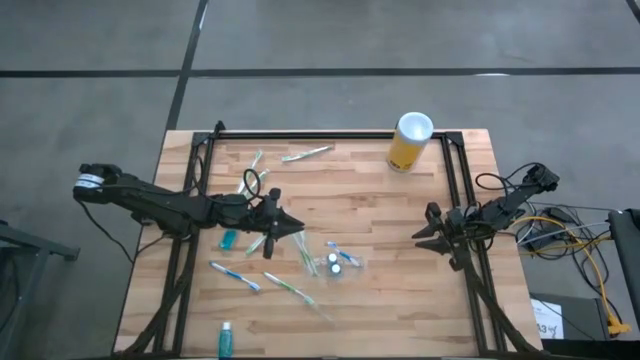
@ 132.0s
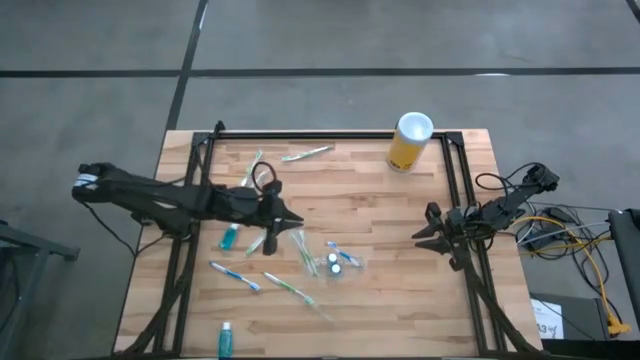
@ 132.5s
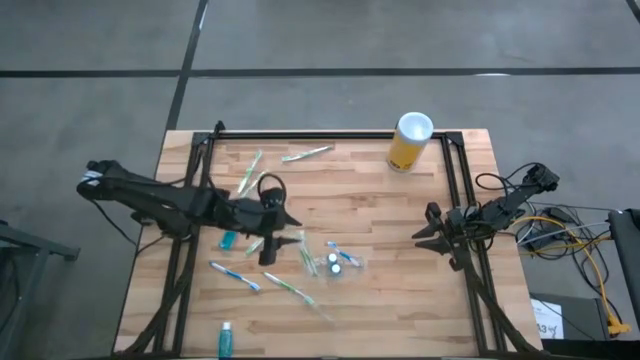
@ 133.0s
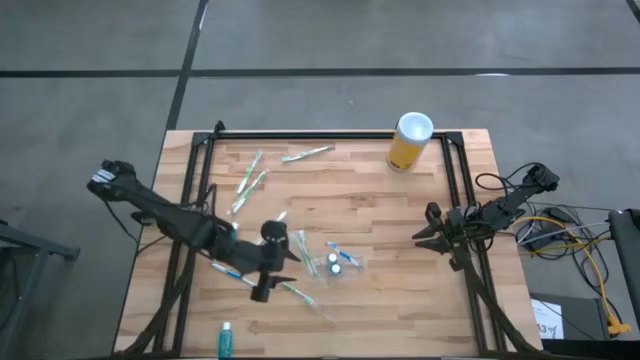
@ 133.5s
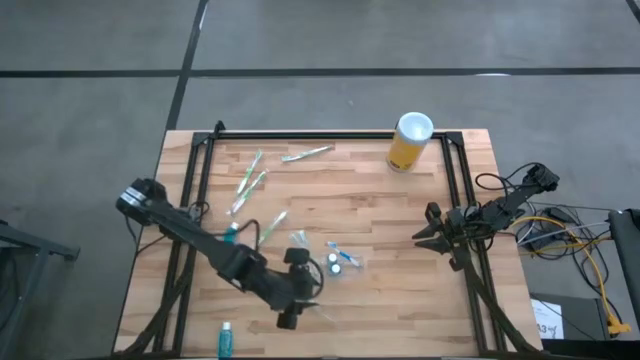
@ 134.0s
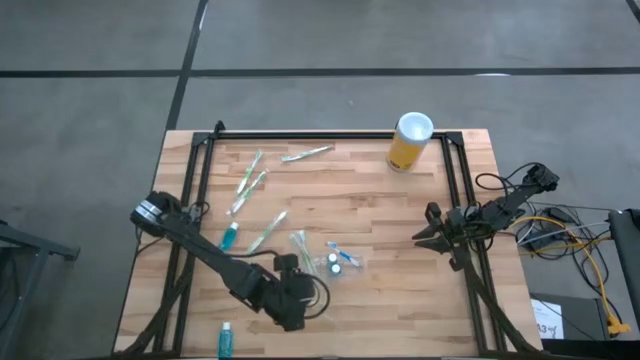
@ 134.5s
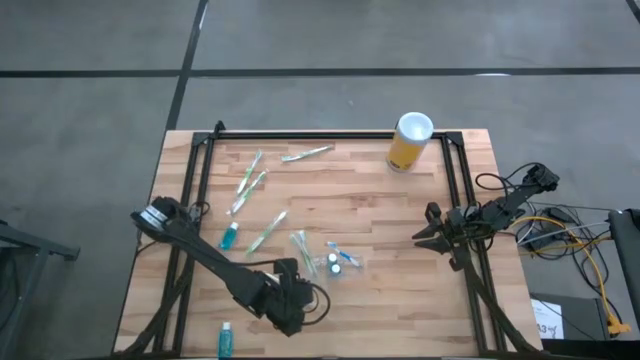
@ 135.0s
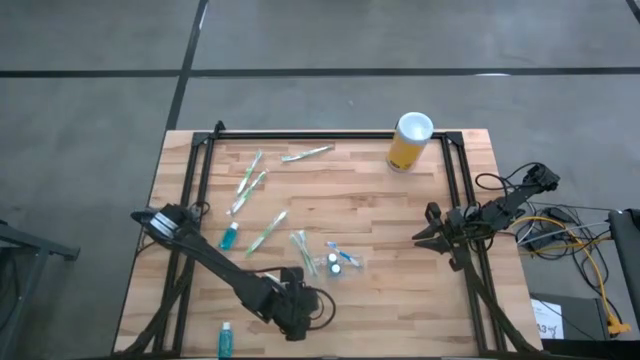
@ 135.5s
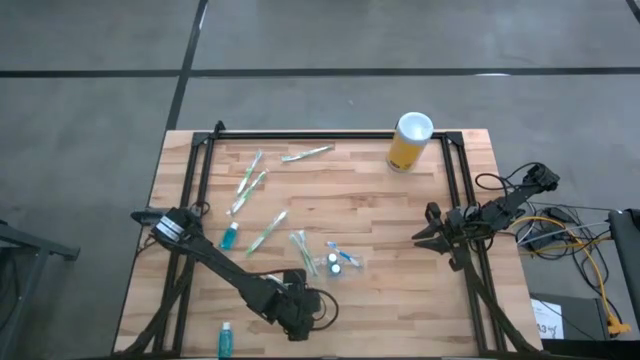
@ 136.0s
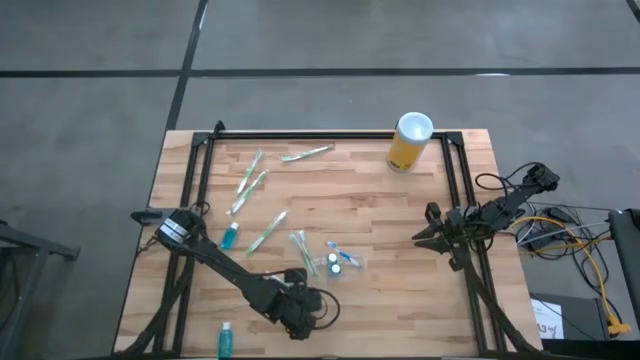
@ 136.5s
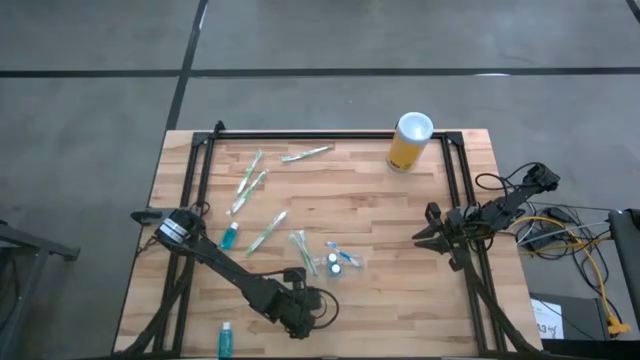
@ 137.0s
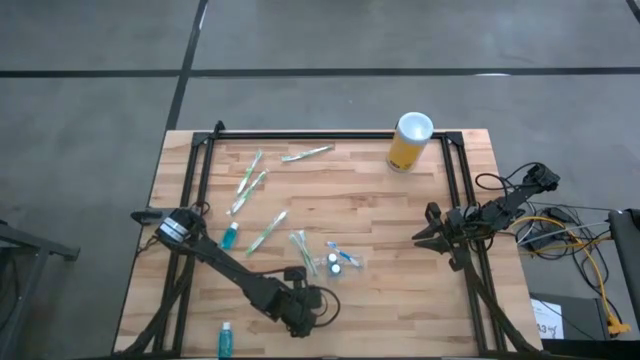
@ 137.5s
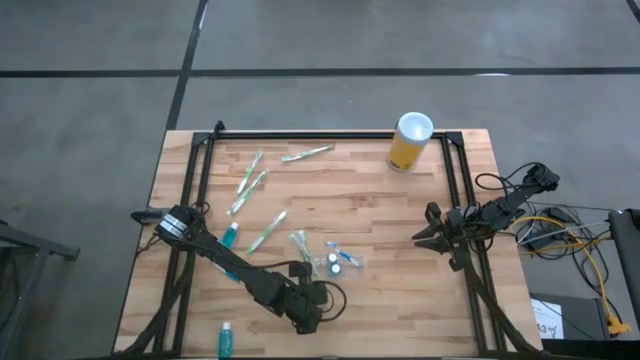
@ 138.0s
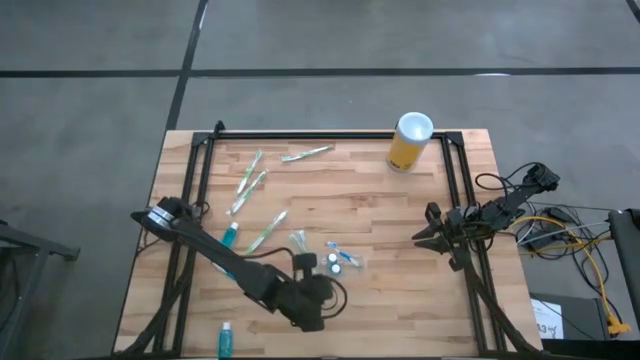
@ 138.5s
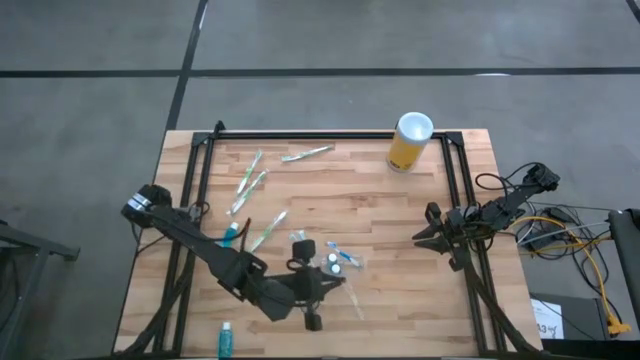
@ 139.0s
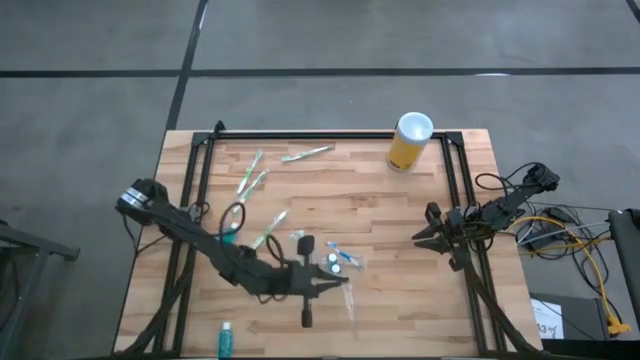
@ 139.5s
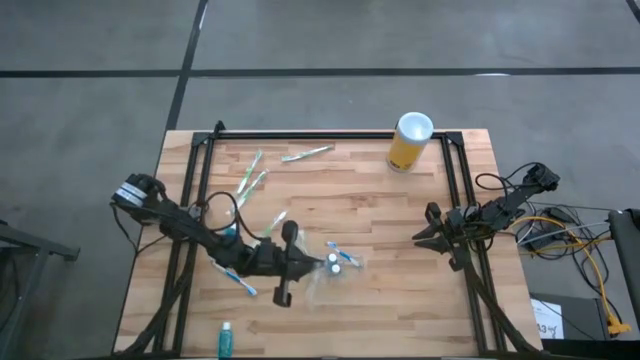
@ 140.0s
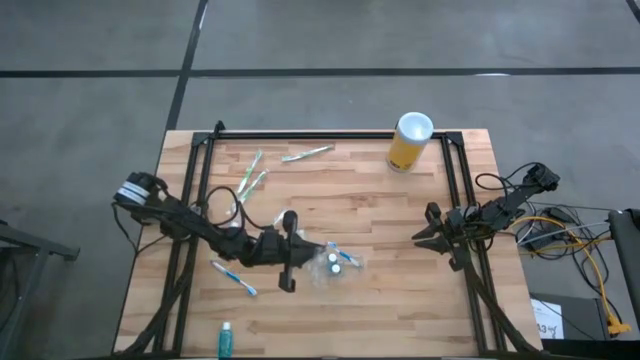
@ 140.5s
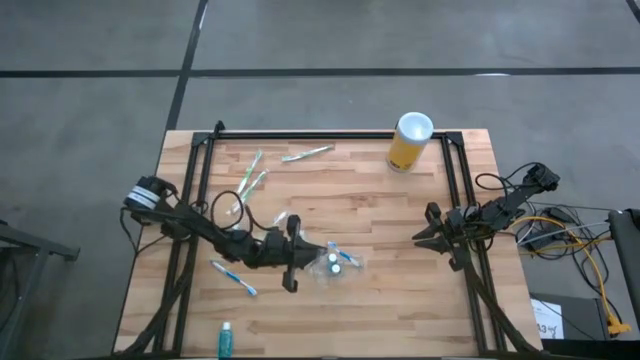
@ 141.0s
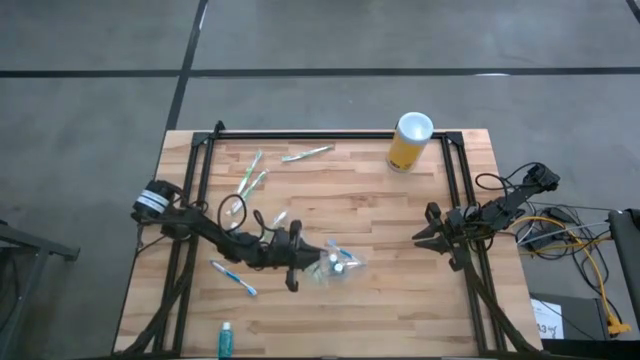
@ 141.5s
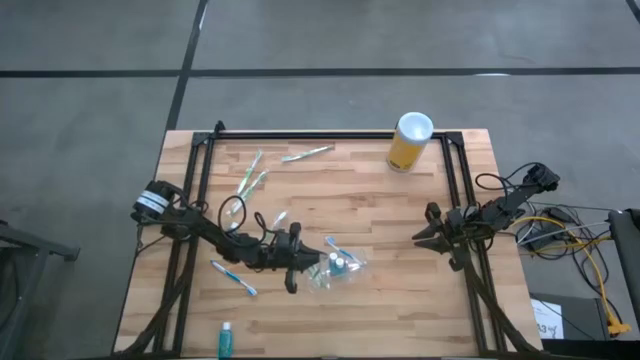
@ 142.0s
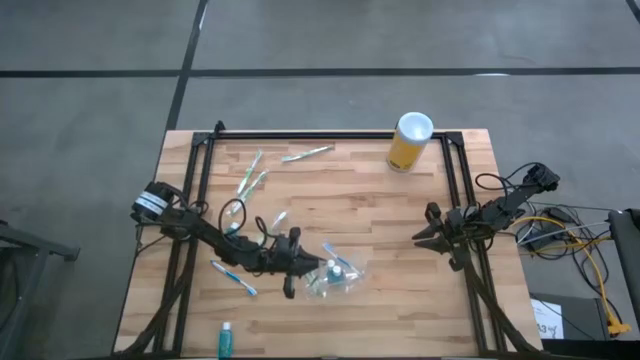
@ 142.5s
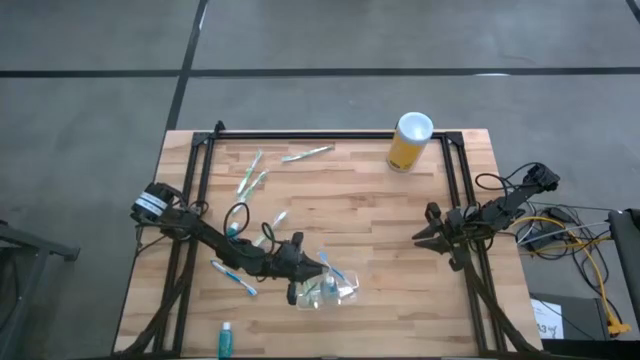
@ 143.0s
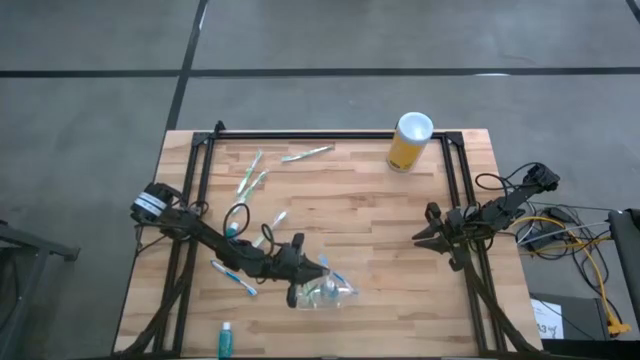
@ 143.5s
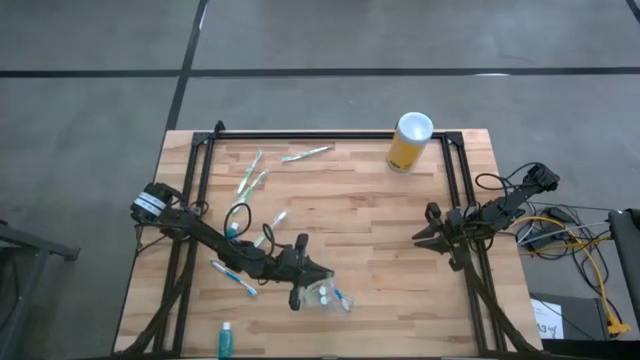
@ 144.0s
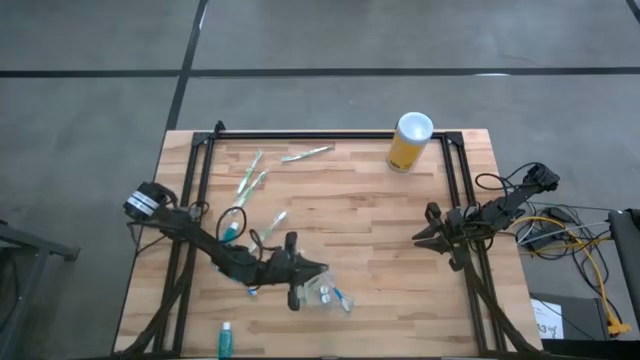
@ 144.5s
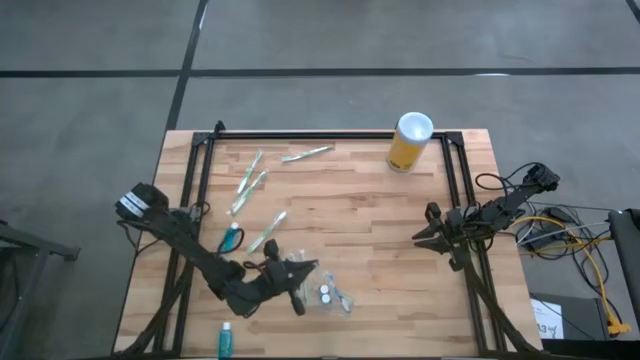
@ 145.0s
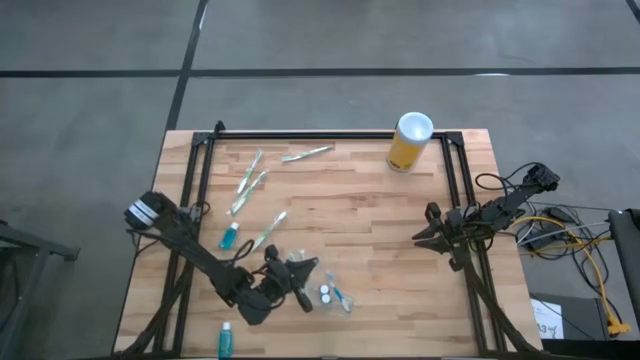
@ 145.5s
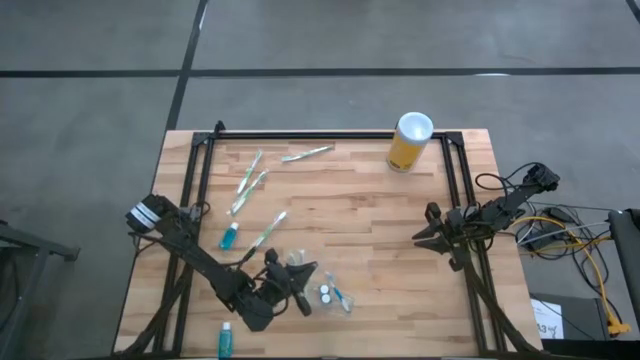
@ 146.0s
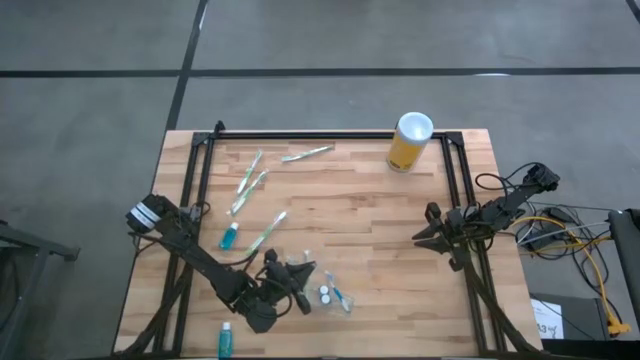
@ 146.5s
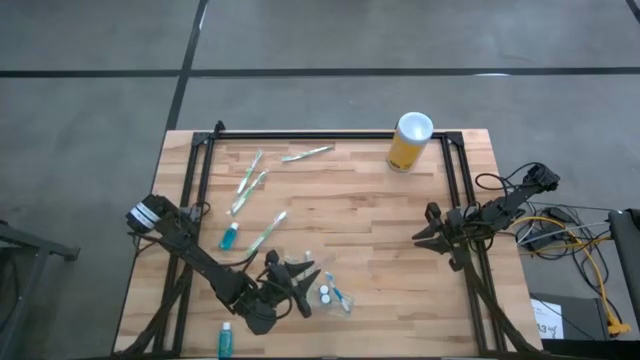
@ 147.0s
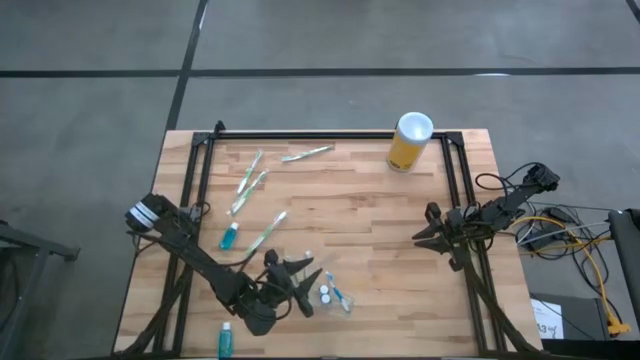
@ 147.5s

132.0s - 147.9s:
Task: Pick & Place toothbrushing station
Put the green toothbrush into the transparent organizer

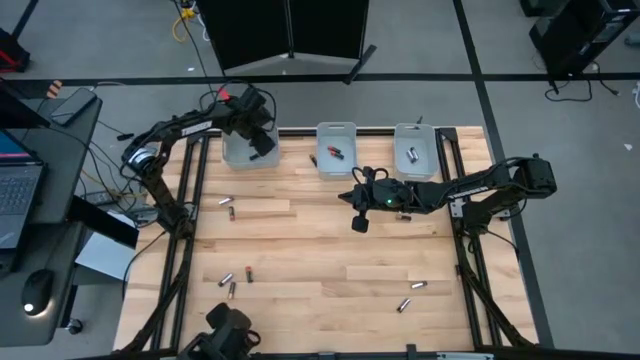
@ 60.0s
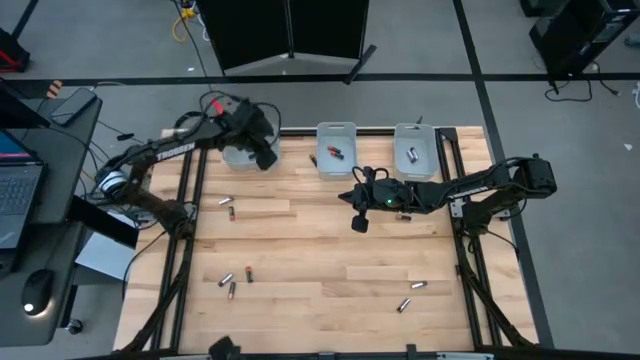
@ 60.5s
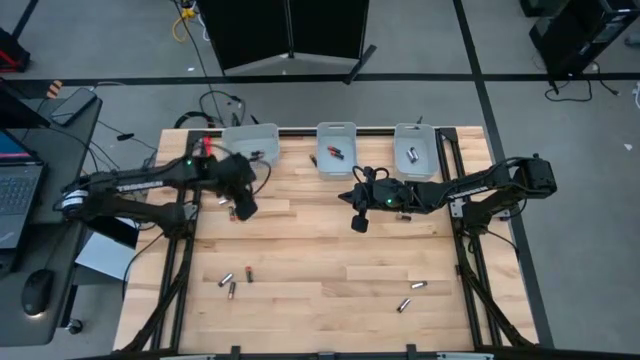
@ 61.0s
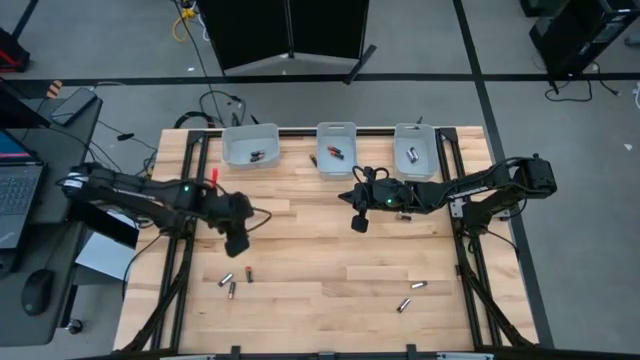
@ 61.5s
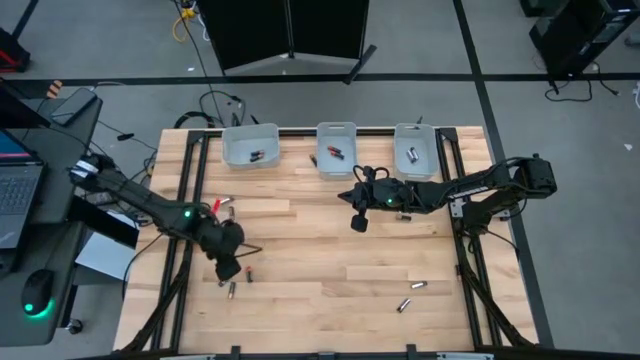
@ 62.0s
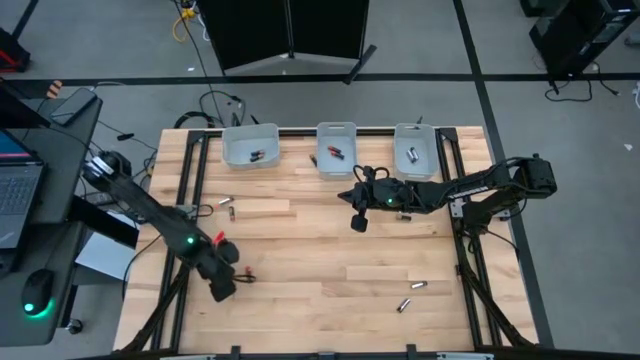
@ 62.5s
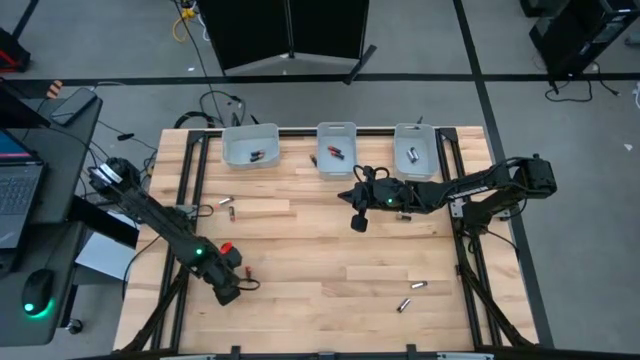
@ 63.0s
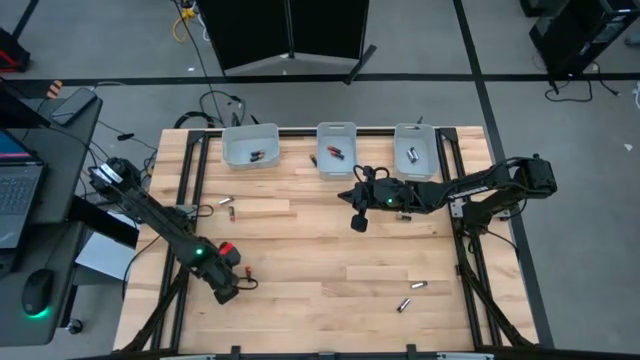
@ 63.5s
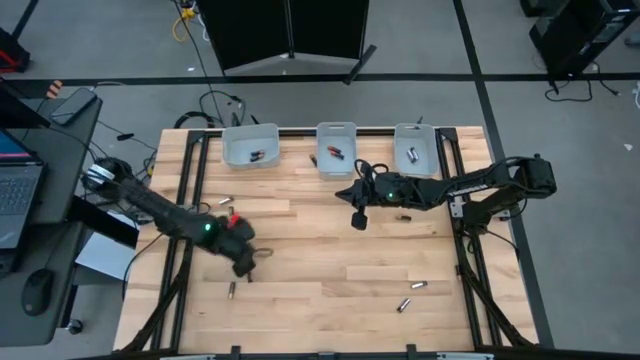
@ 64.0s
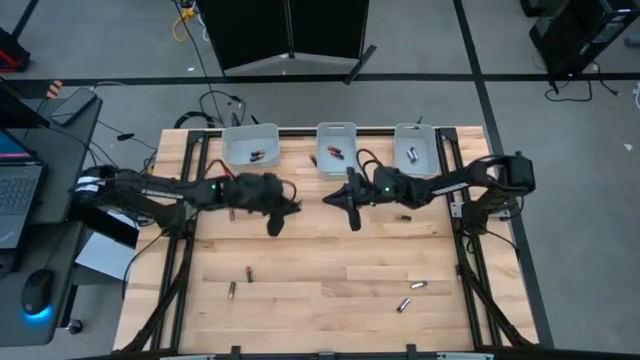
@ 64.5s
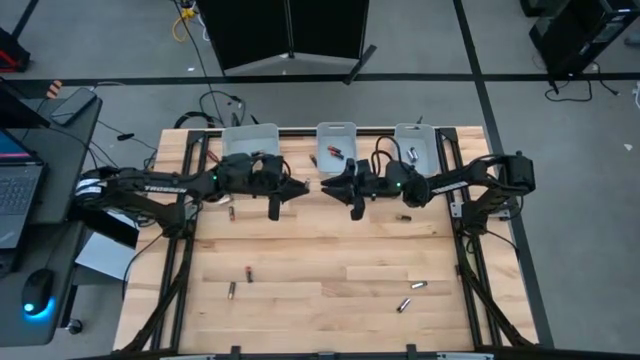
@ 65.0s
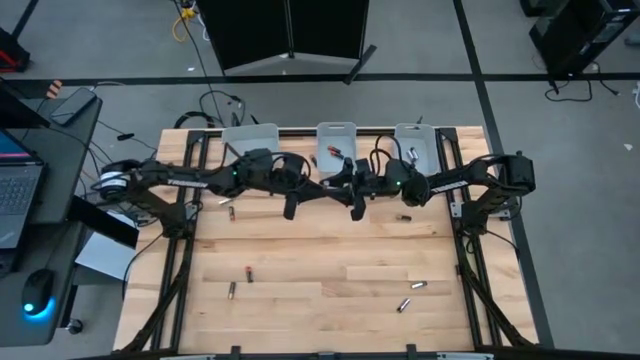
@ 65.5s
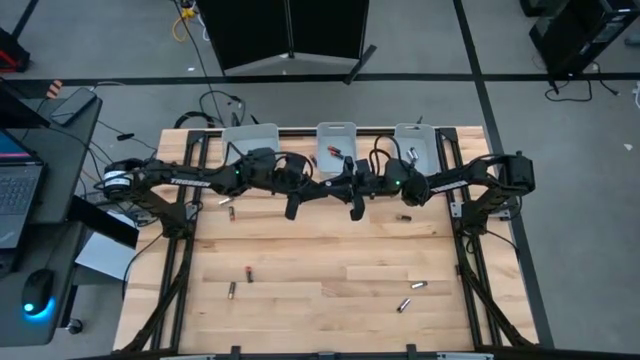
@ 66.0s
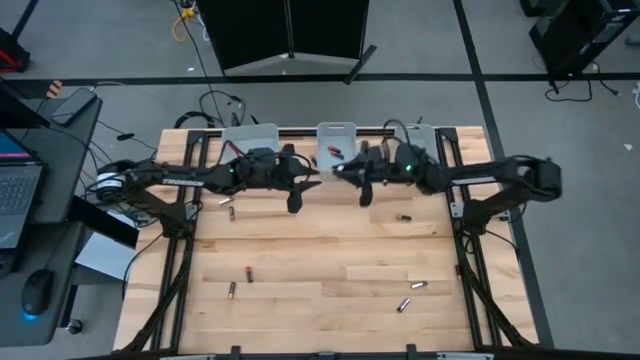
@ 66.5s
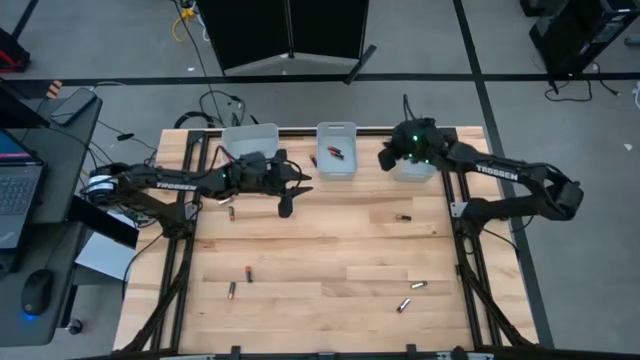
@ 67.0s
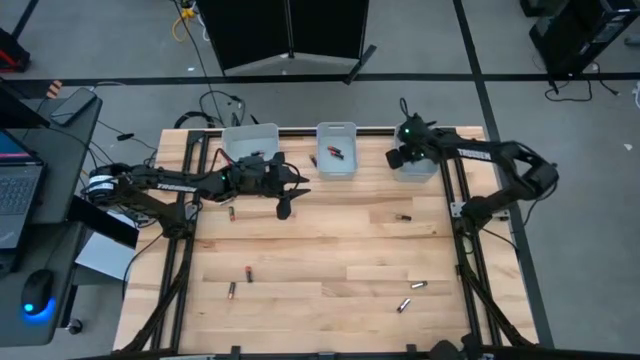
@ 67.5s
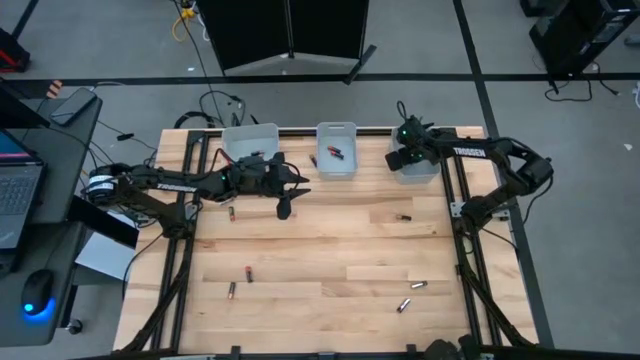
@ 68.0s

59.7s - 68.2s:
Task: Sort batteries
Put the black silver battery into the right bin
